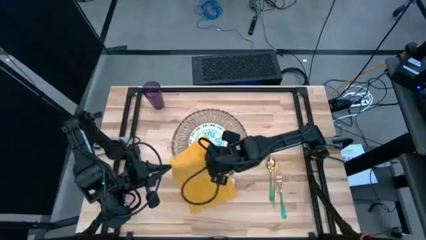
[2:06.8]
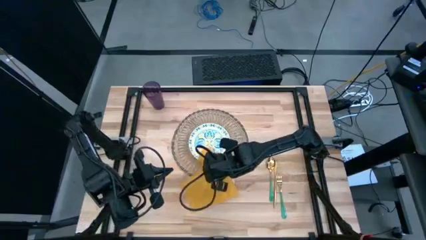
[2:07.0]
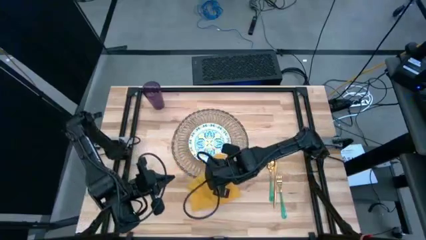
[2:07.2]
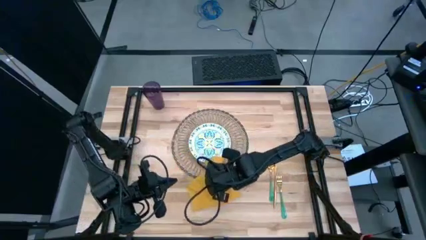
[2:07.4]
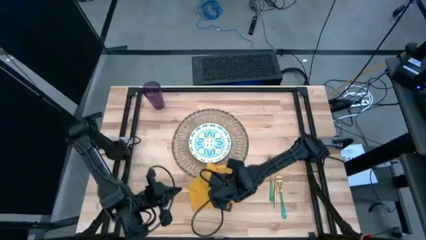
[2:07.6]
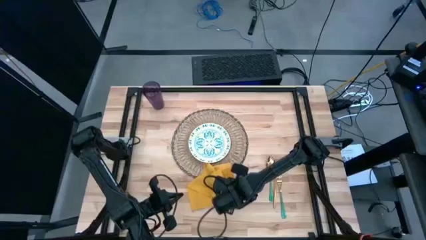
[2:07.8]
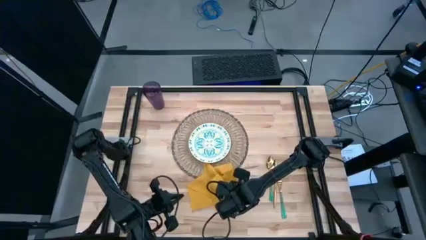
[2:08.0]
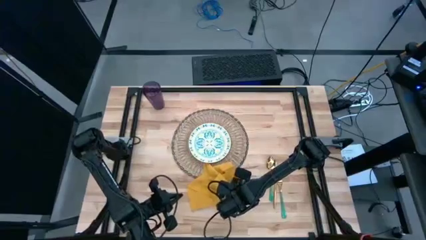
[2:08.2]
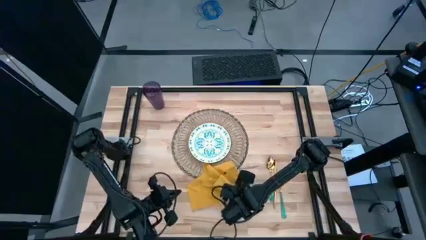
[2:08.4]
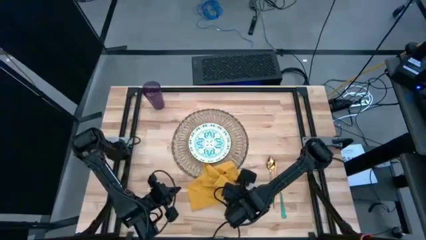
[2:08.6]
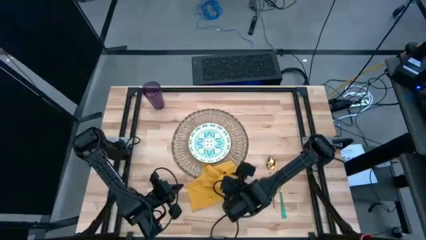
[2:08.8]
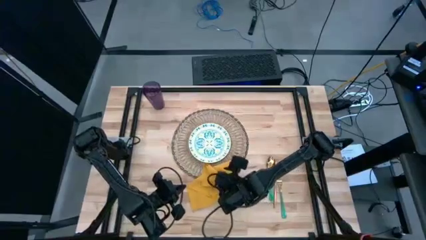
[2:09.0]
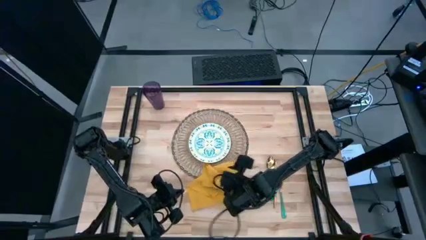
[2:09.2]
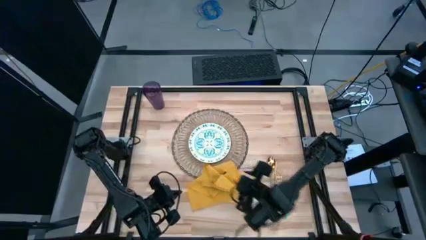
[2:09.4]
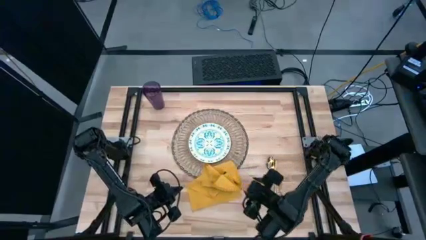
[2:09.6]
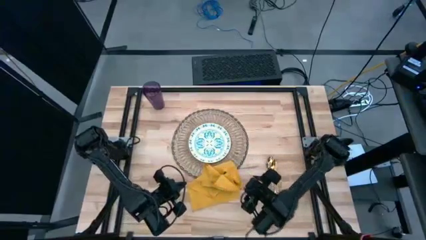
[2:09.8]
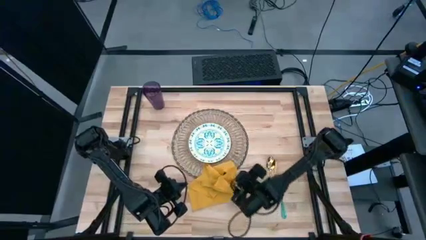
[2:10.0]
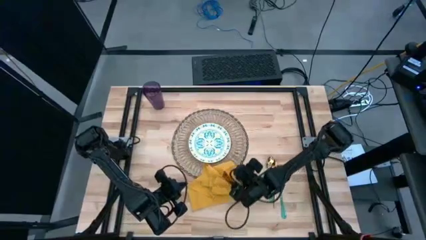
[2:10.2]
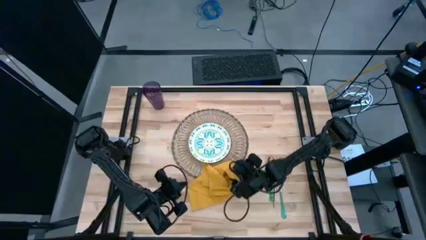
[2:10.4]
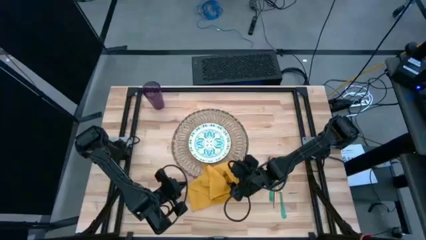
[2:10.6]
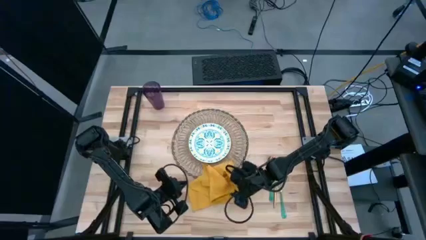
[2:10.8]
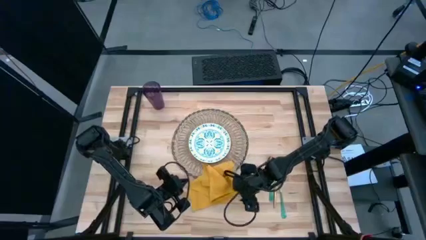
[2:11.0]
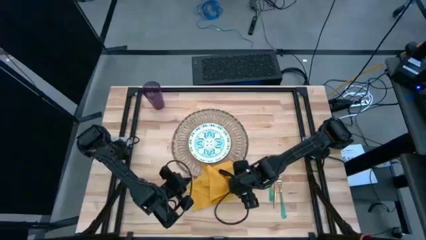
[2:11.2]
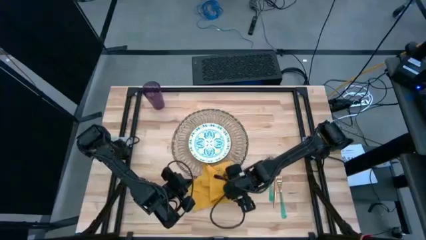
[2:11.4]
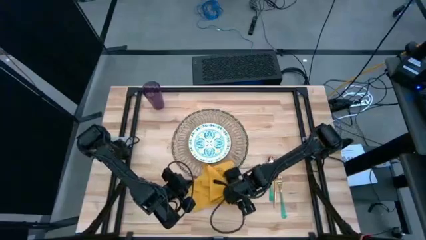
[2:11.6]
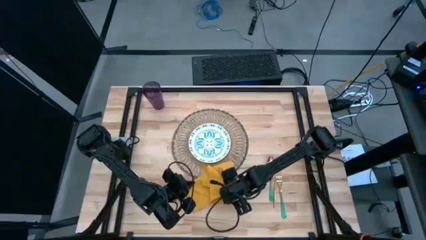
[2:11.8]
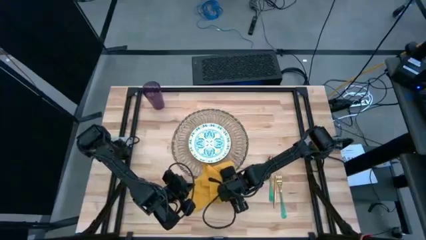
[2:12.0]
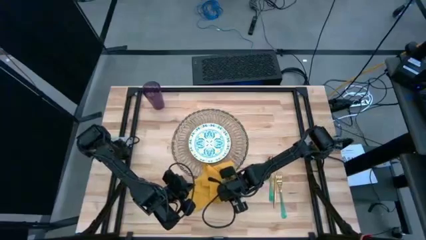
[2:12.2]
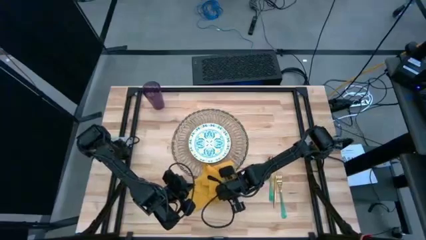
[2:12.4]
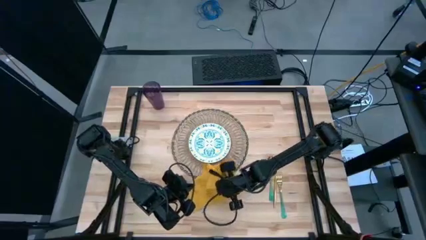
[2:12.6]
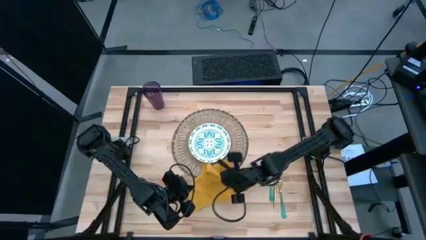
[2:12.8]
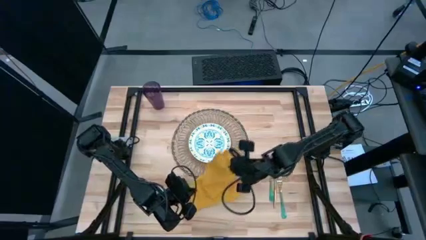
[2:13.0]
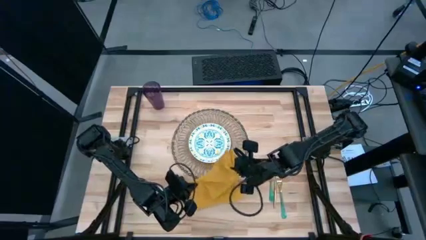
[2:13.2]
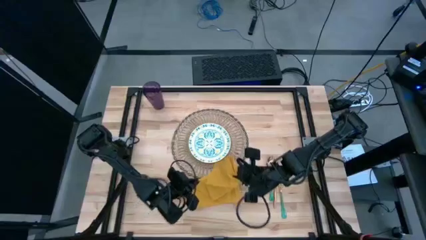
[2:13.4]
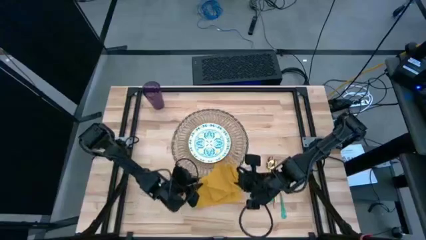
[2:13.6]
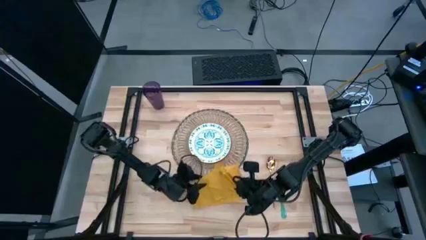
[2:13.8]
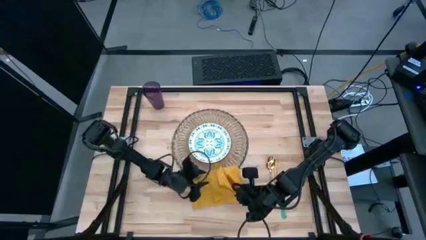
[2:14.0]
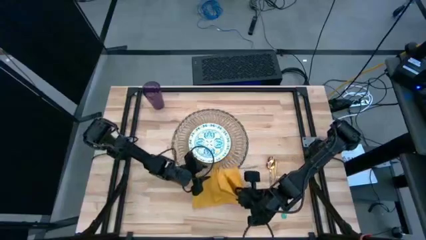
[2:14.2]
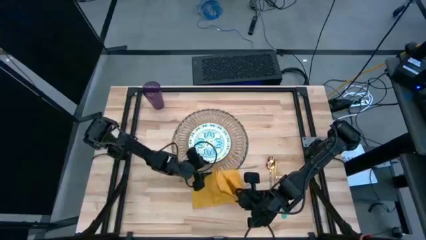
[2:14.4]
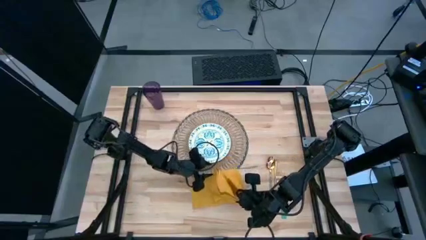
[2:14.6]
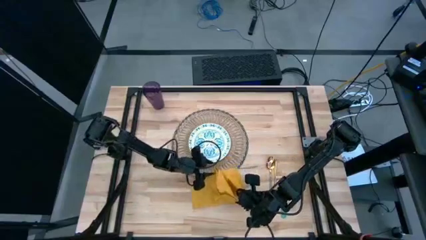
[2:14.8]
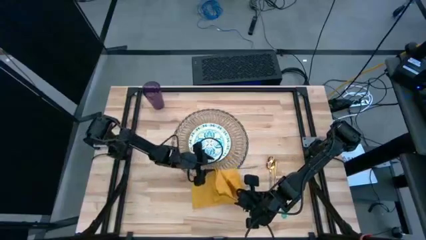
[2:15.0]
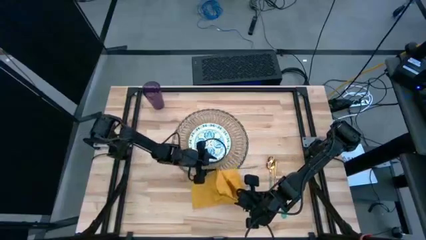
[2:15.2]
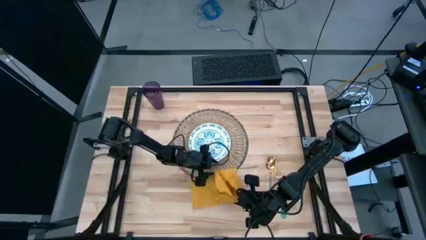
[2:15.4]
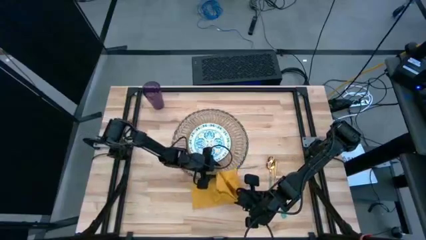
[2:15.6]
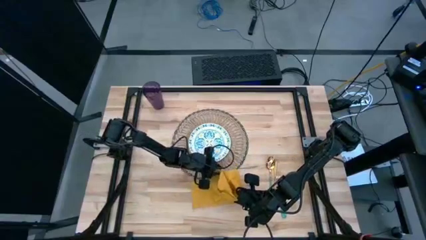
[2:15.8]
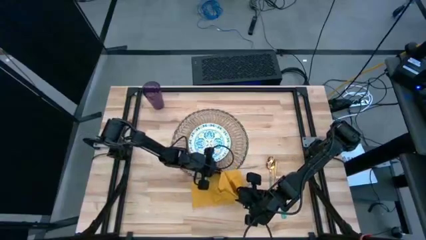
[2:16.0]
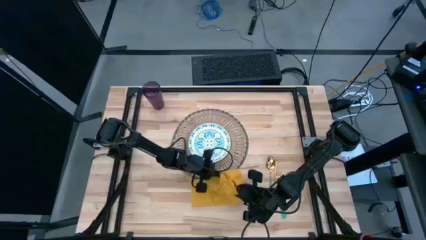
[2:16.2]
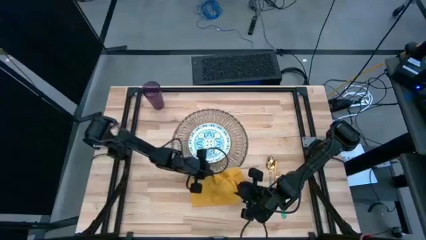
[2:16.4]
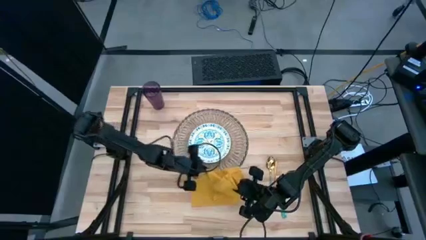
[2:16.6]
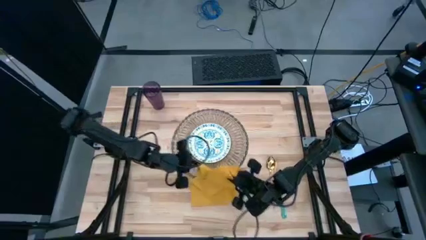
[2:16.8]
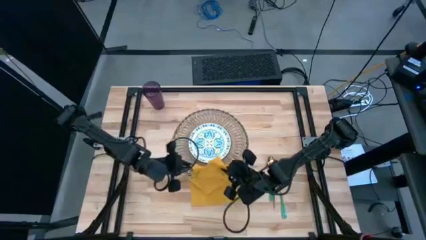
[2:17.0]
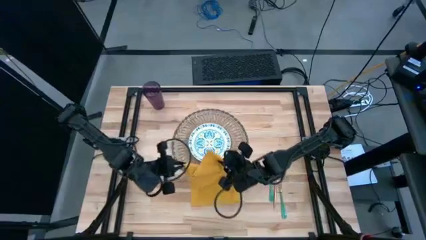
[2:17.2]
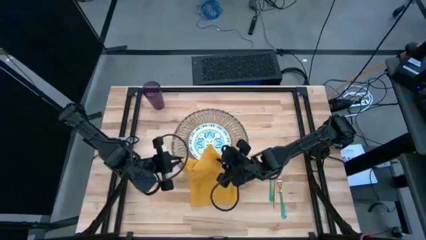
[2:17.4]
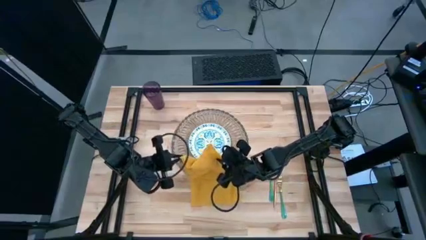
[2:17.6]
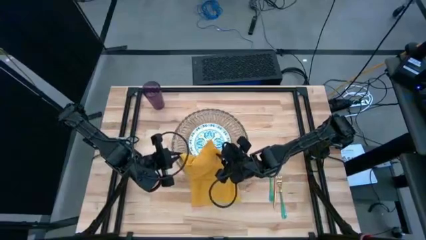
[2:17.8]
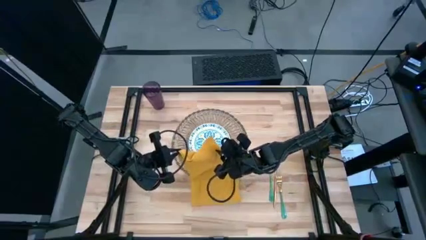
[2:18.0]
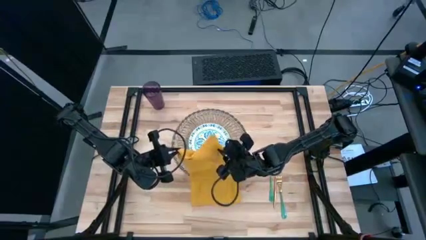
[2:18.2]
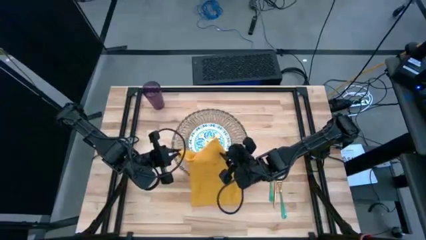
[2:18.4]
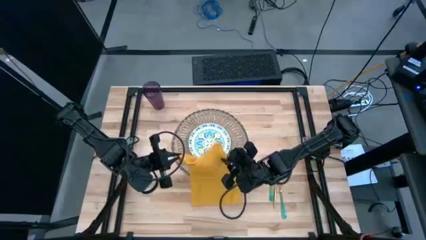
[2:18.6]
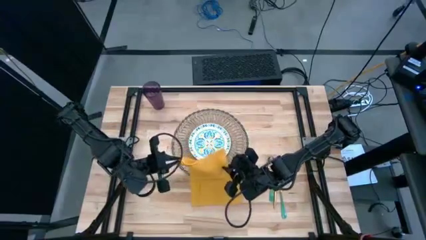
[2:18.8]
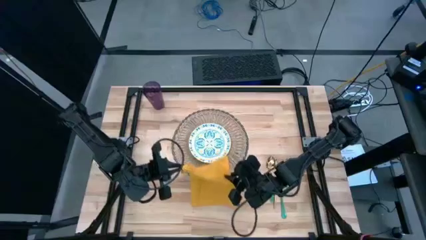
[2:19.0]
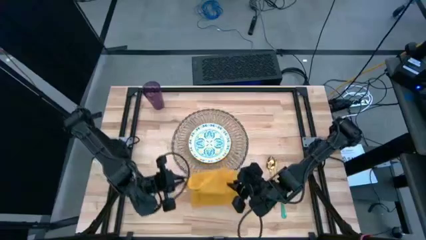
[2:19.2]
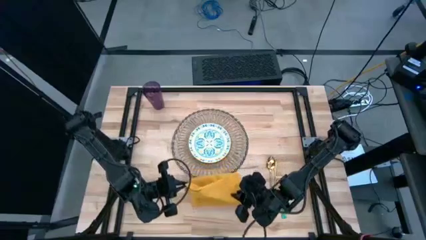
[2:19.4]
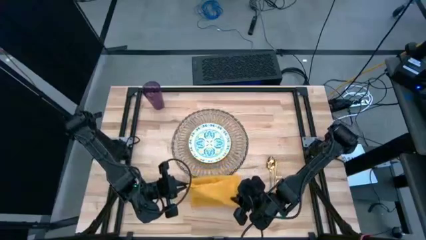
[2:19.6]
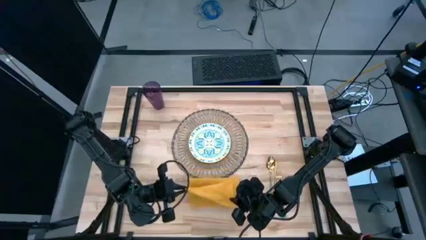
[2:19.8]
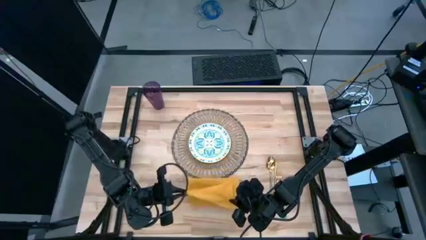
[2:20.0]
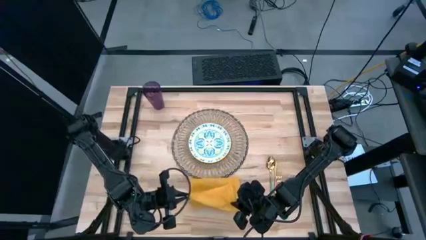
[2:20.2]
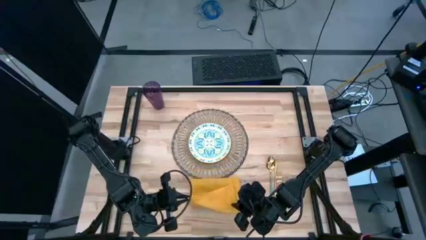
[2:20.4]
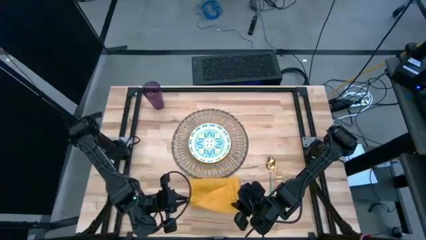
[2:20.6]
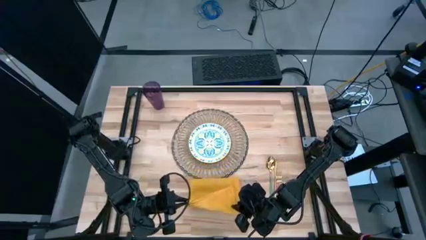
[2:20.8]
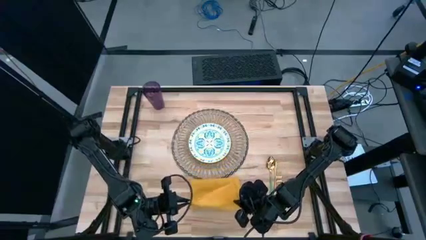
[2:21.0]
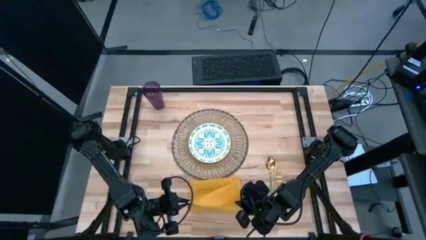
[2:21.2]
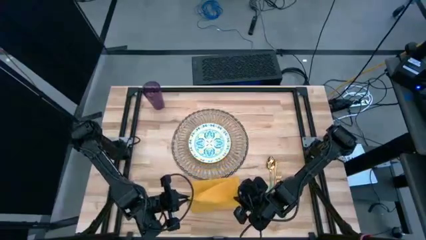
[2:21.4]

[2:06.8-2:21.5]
Task: Set table place
Fold the yellow table napkin

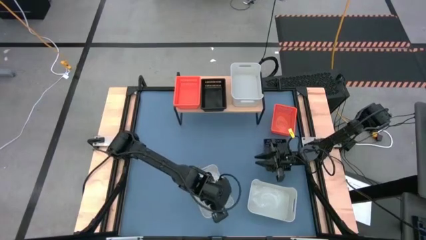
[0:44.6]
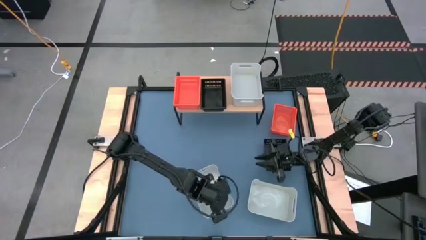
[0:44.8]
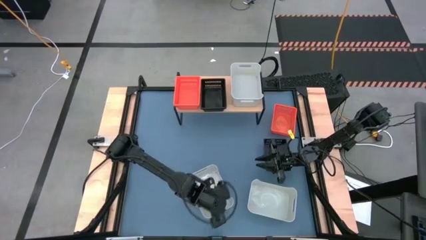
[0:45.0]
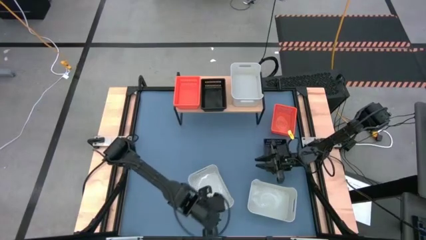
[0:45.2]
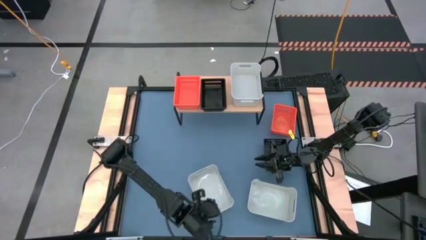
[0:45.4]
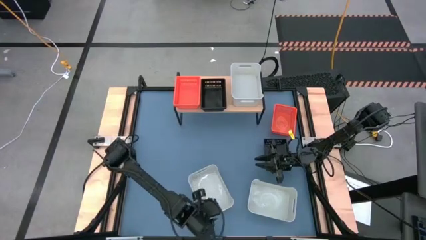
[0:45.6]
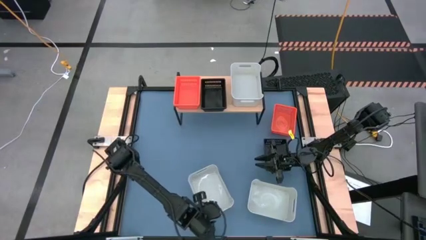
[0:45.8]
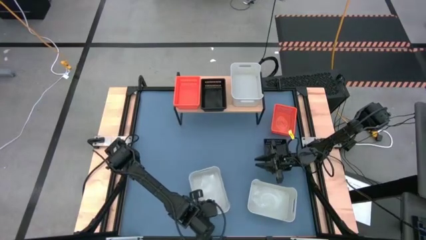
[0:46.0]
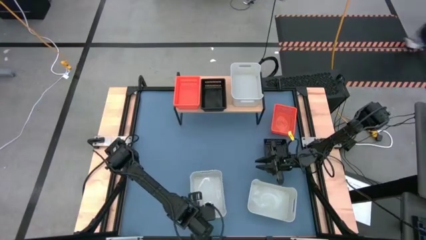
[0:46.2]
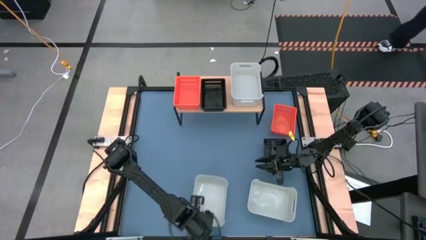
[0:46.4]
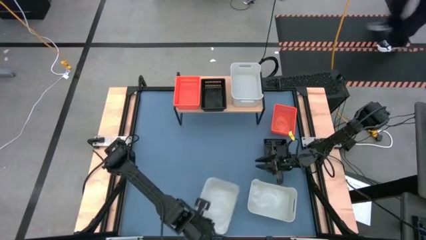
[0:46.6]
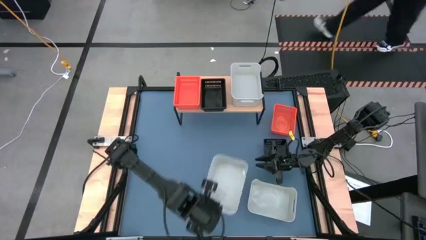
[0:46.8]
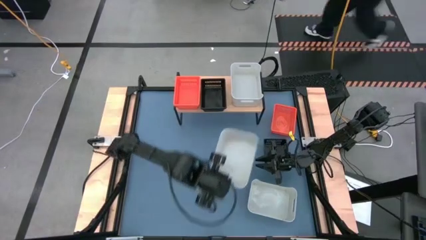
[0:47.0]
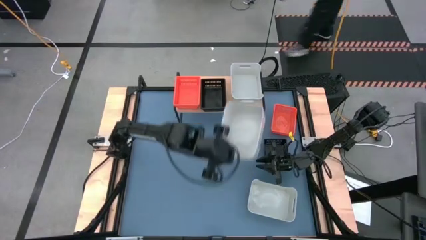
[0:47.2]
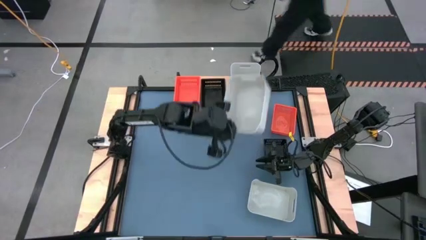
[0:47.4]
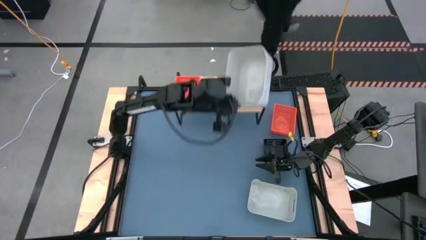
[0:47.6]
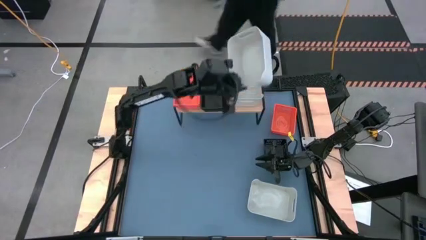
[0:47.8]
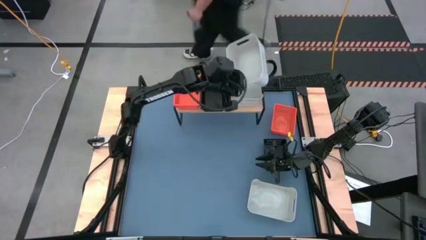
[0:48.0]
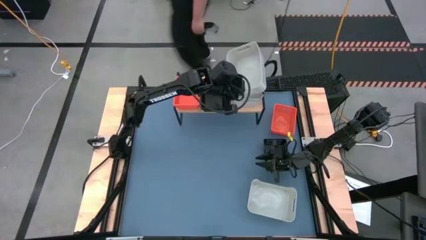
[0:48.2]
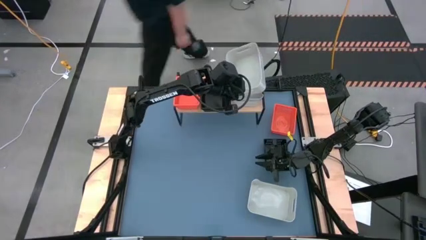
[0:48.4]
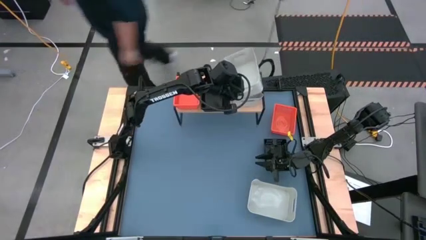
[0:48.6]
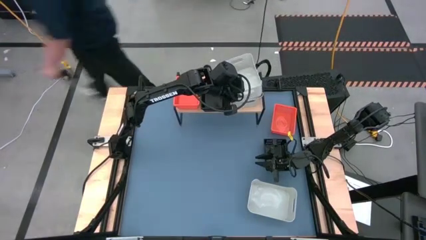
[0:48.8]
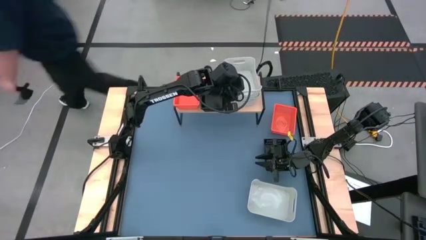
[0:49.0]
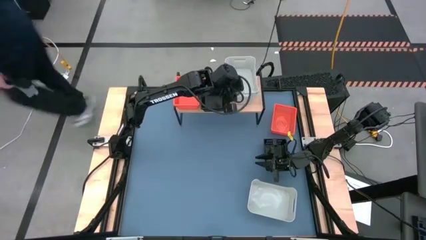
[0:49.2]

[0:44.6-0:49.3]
Task: Stack baskets on shelf by color
Stack the left gray bin on top of the other gray bin on the shelf
